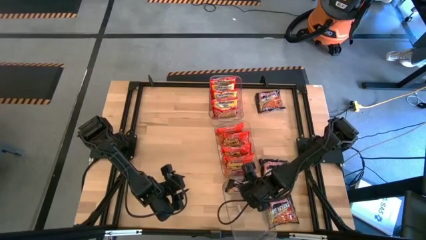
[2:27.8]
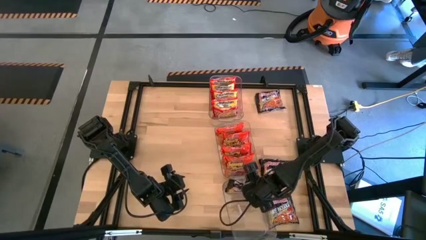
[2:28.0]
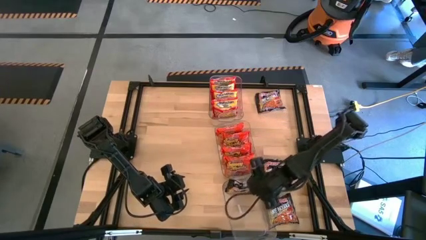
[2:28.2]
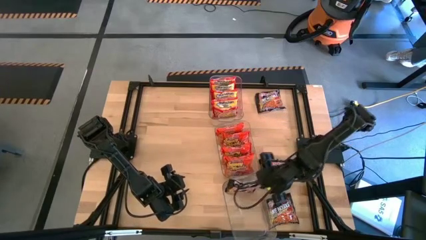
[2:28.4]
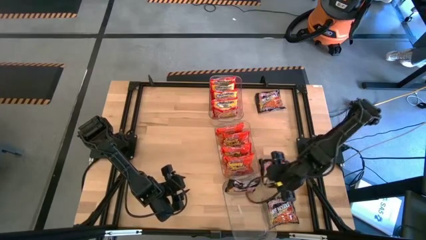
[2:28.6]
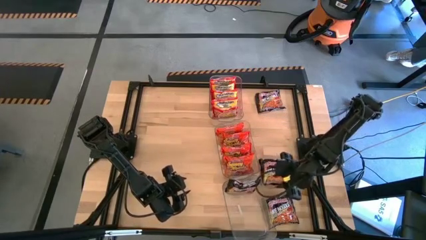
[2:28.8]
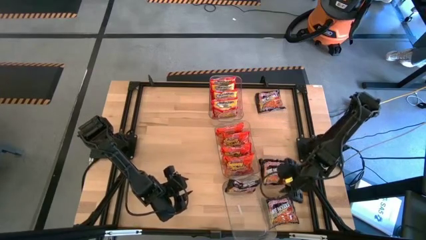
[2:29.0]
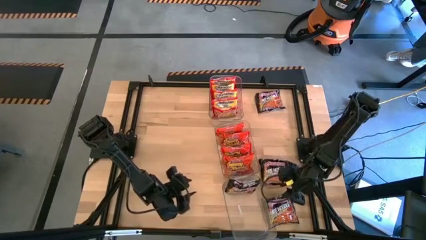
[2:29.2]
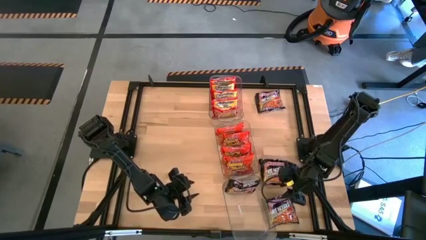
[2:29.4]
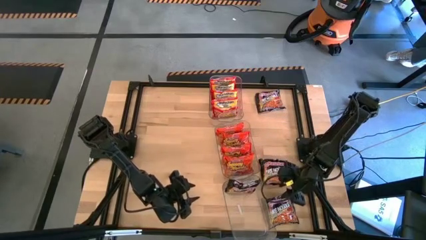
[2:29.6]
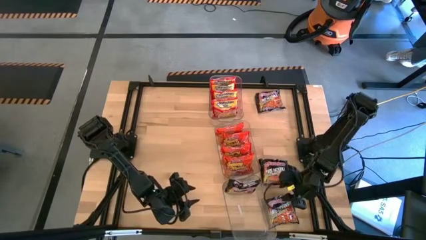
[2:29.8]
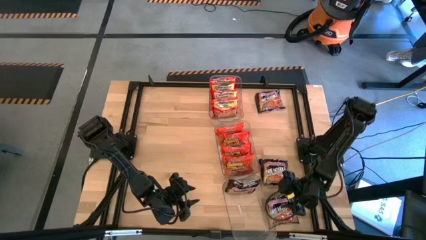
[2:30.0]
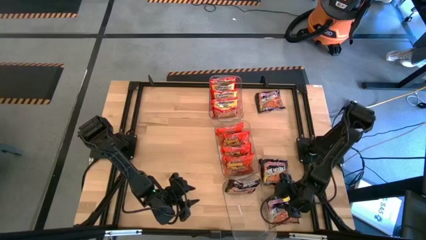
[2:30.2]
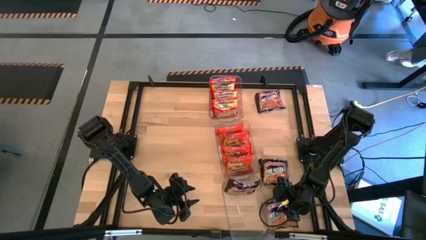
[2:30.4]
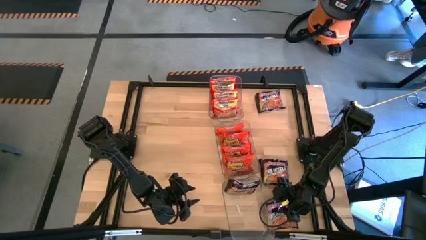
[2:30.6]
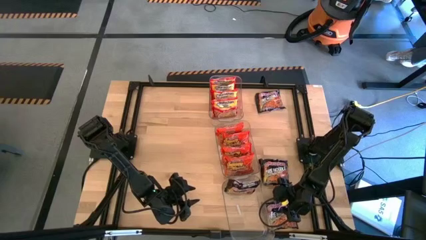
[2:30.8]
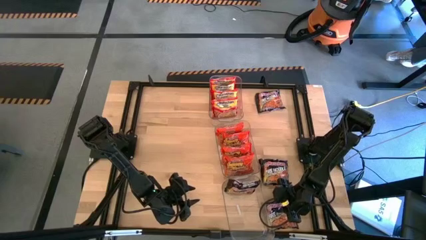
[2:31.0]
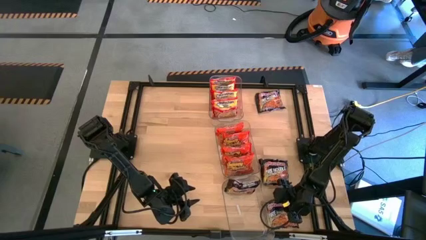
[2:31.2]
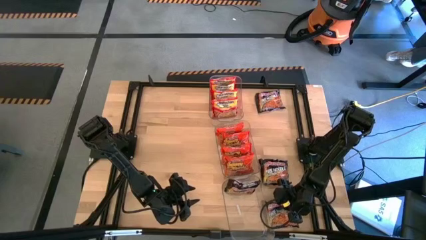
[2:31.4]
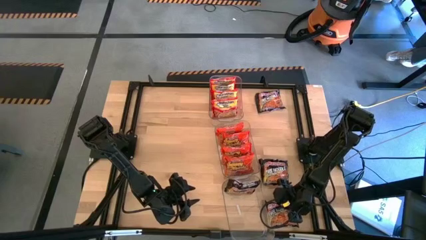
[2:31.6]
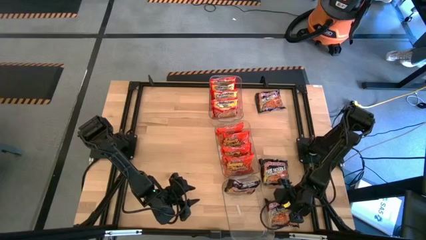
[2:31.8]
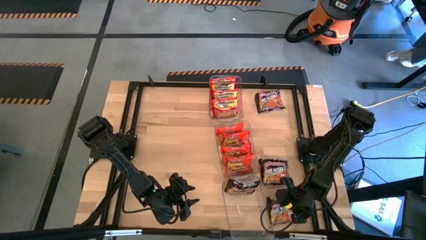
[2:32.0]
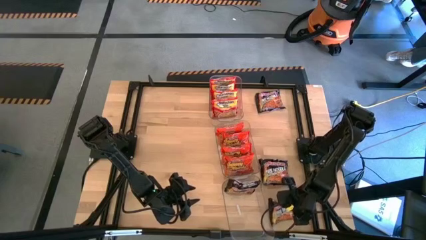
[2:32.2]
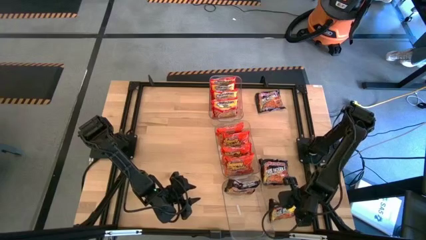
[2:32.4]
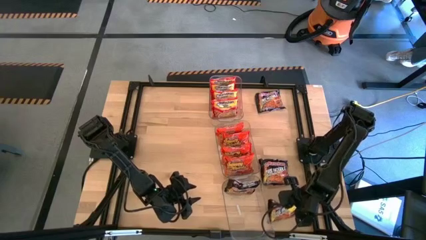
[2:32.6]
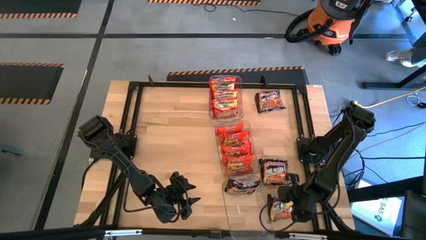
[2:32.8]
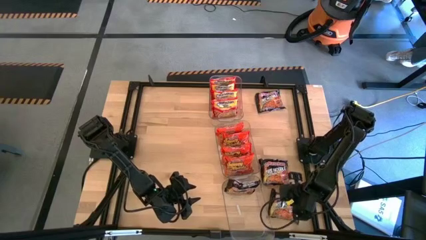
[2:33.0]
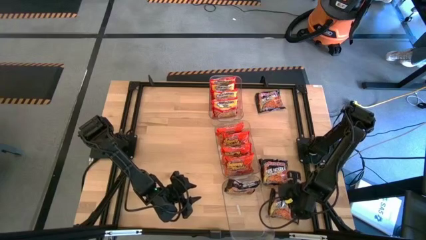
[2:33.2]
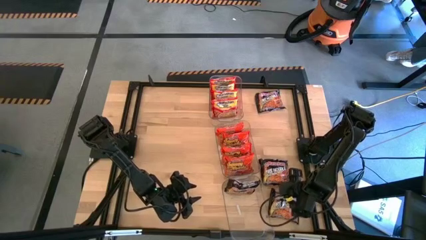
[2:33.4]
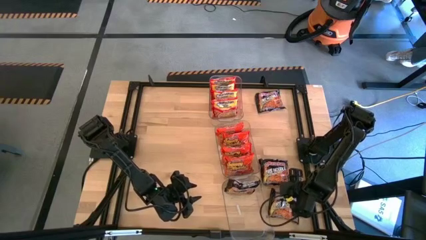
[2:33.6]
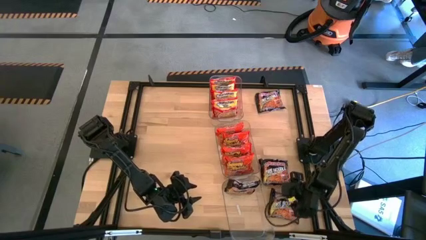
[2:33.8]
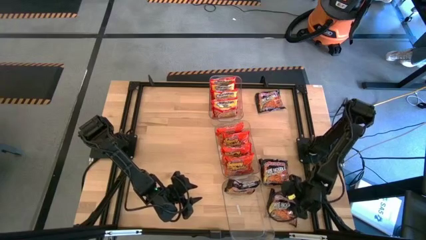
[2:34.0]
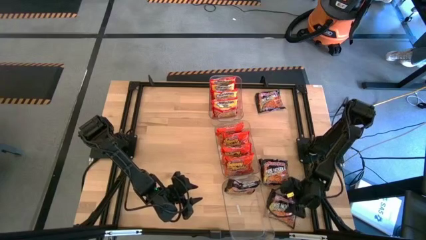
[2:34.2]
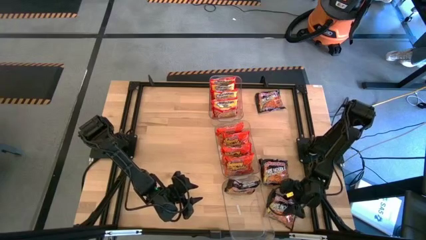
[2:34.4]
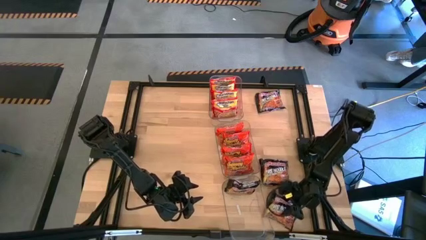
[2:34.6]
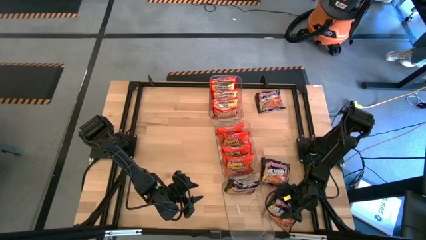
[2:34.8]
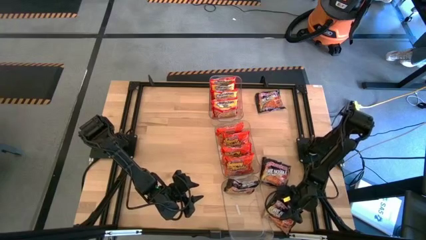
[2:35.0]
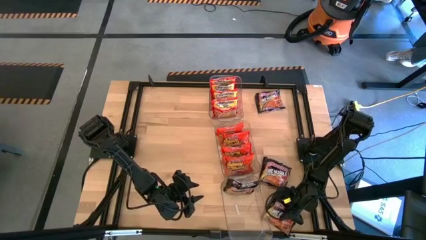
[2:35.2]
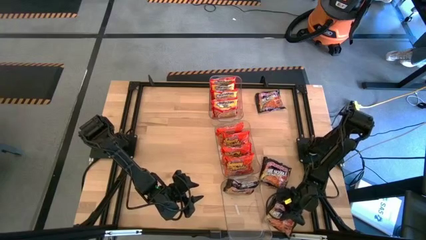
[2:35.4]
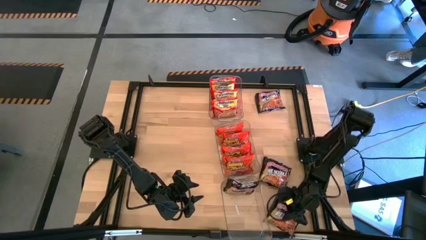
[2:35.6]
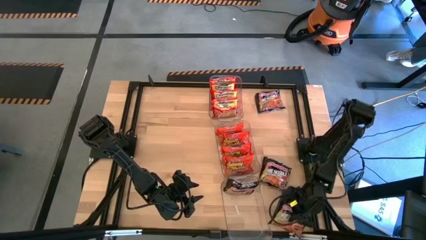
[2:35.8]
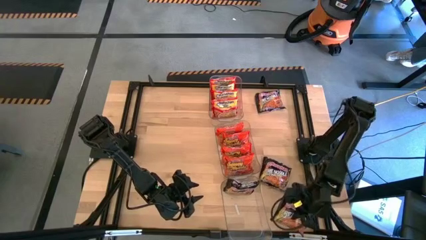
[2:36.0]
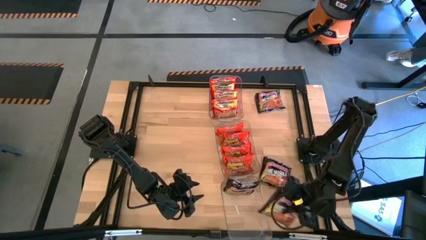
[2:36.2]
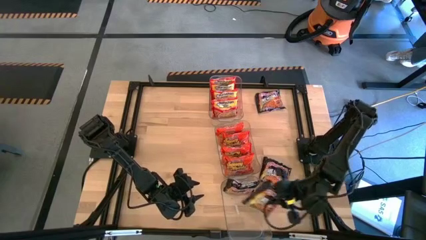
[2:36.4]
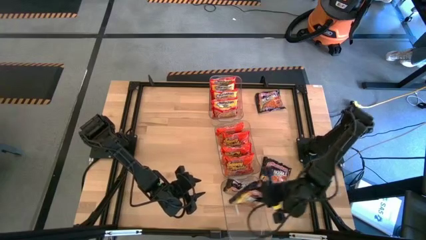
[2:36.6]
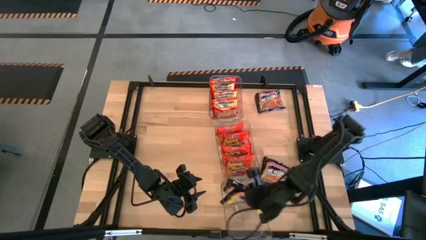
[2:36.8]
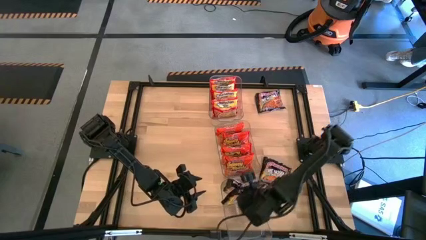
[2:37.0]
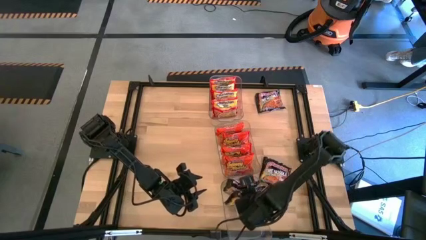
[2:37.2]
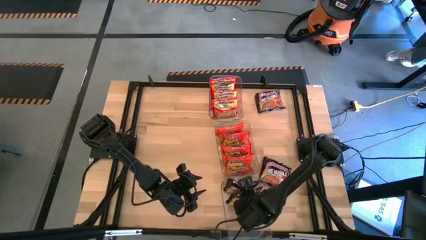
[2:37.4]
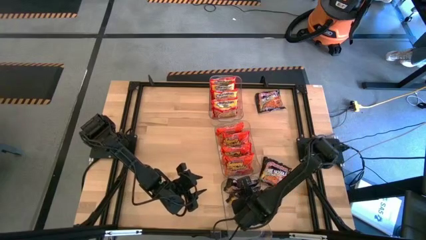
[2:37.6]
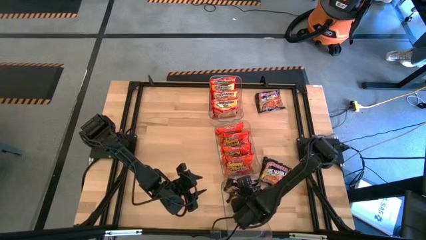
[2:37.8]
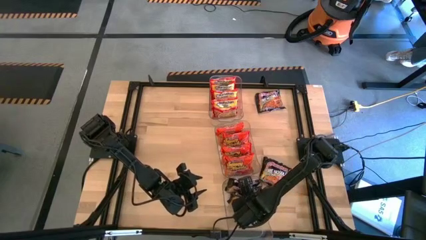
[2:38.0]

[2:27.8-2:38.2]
Task: Sort Maruchan noodles
Put the orange noodle pack into the middle transparent bin

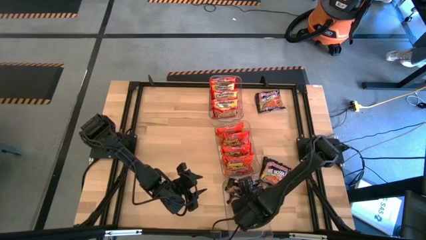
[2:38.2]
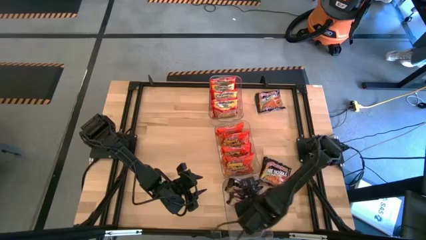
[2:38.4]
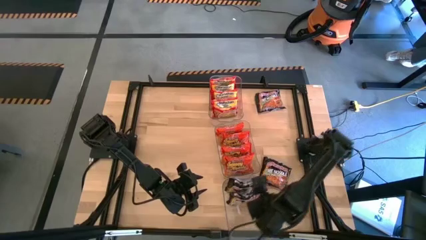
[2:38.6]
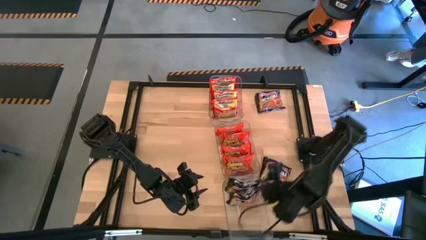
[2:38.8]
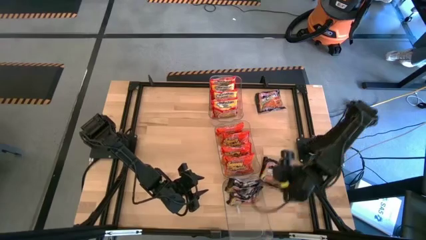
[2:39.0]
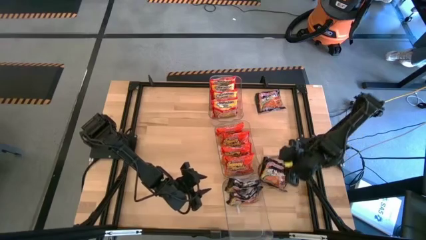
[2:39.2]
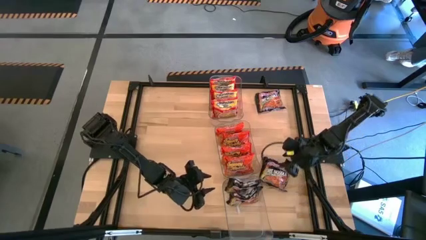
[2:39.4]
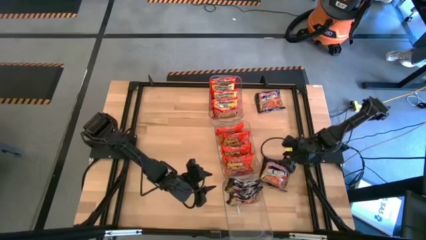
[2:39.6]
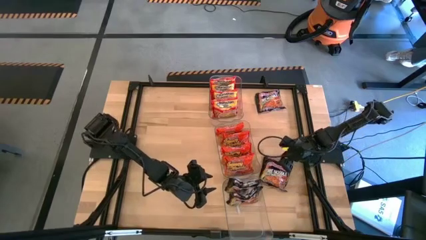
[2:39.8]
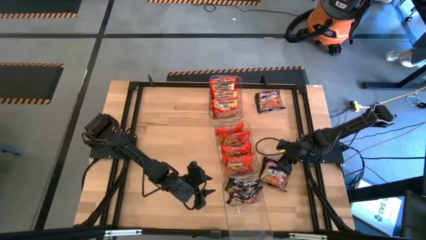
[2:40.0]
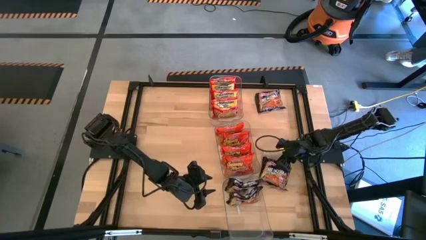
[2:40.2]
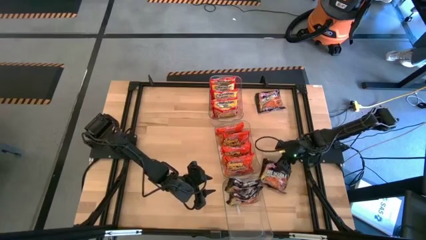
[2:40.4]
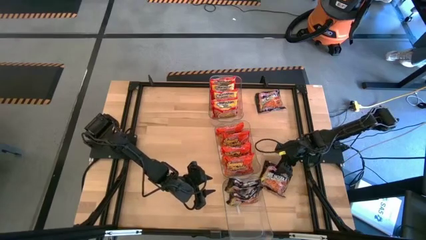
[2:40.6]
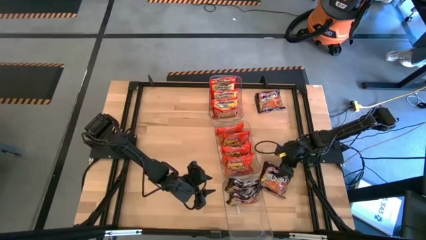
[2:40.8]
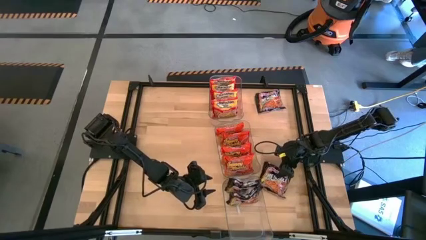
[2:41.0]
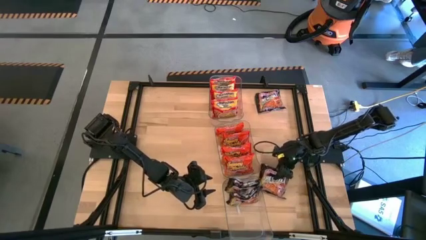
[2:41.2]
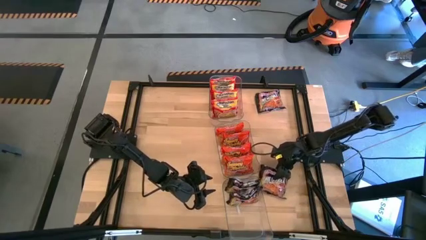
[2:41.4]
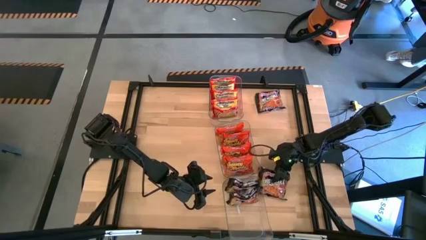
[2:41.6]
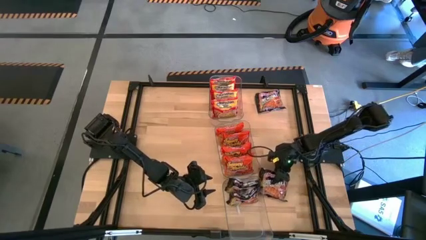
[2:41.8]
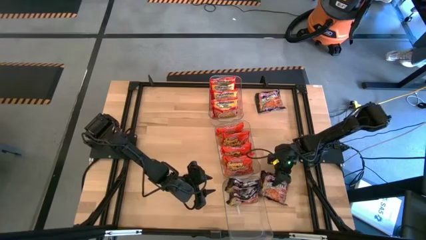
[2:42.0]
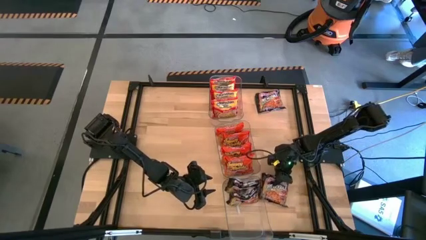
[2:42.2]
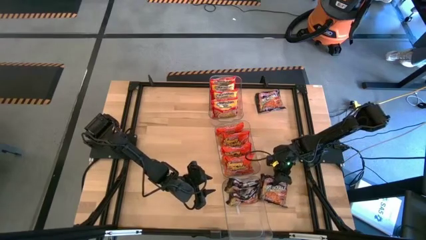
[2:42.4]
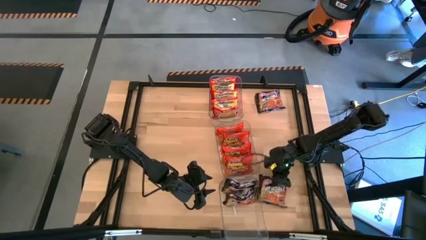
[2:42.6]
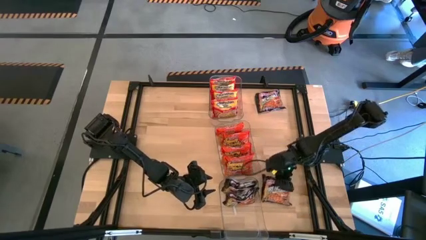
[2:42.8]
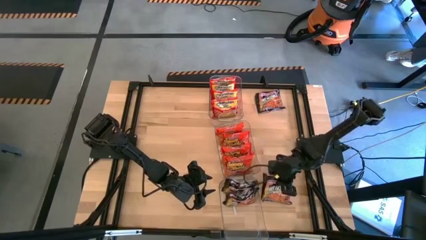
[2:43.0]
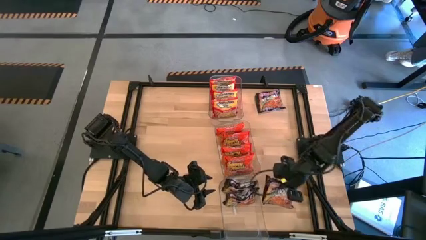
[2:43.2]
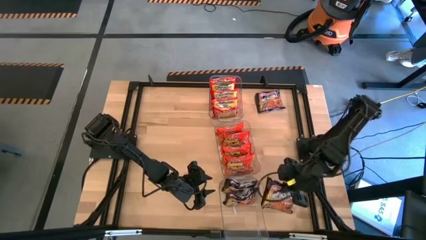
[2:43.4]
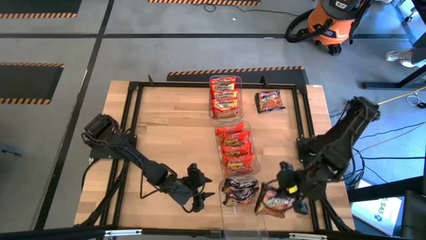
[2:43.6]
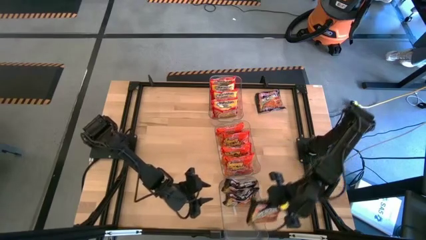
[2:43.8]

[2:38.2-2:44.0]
Put the orange noodle pack into the middle transparent bin
